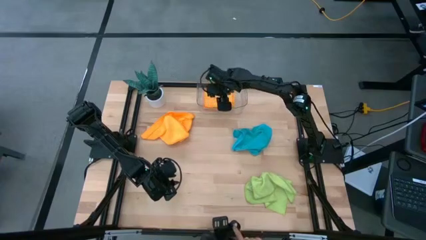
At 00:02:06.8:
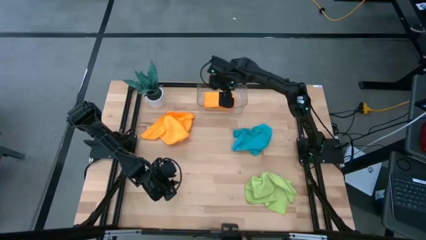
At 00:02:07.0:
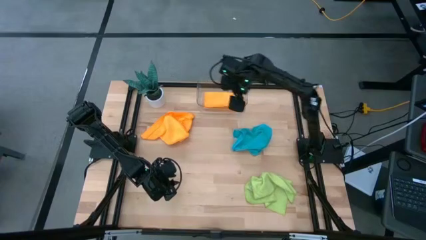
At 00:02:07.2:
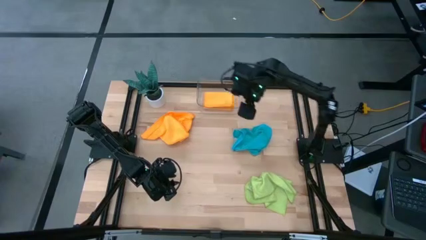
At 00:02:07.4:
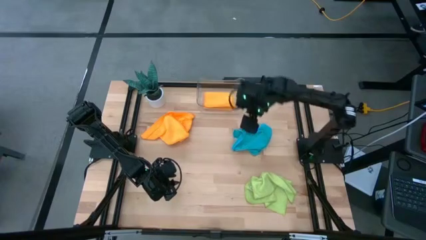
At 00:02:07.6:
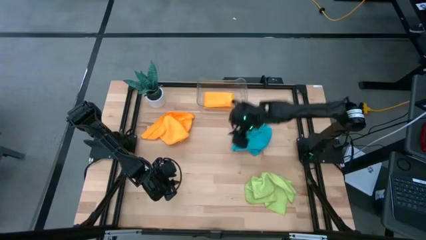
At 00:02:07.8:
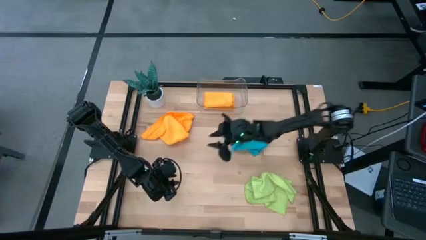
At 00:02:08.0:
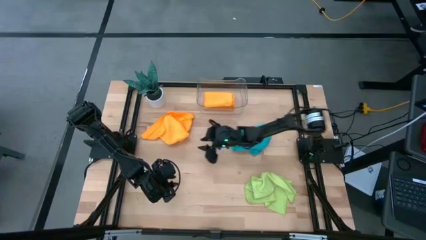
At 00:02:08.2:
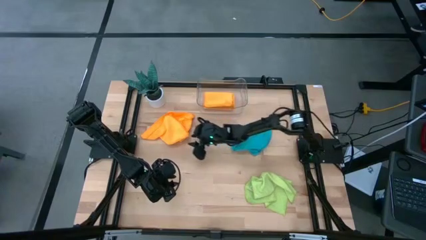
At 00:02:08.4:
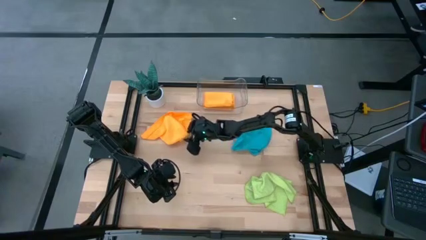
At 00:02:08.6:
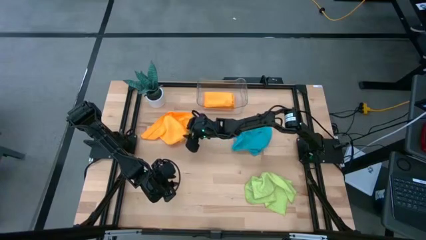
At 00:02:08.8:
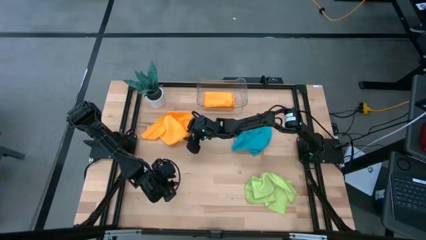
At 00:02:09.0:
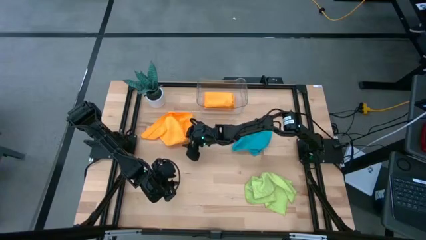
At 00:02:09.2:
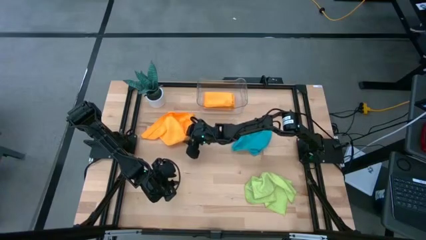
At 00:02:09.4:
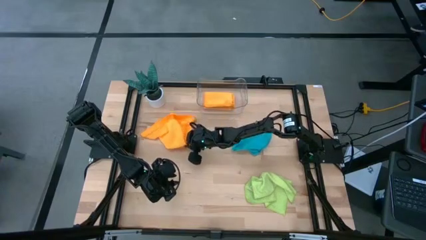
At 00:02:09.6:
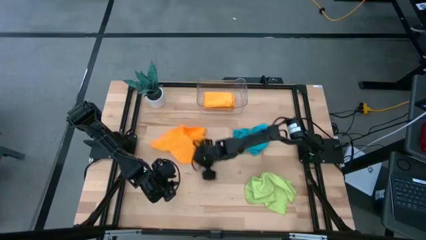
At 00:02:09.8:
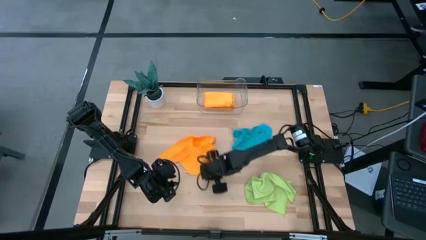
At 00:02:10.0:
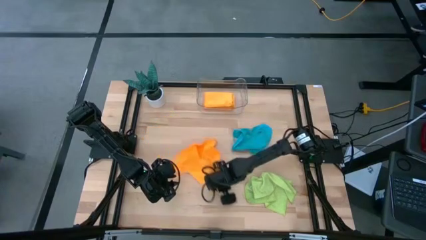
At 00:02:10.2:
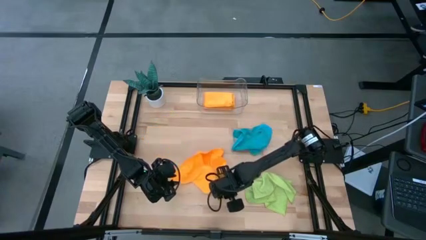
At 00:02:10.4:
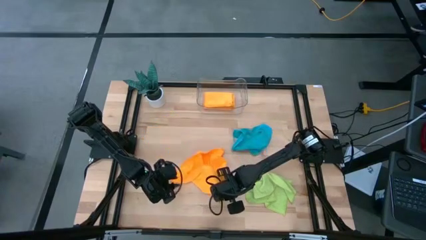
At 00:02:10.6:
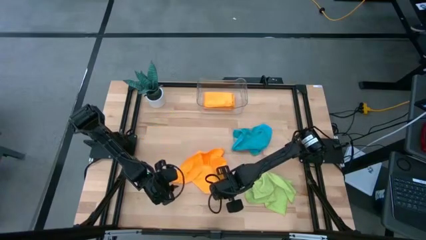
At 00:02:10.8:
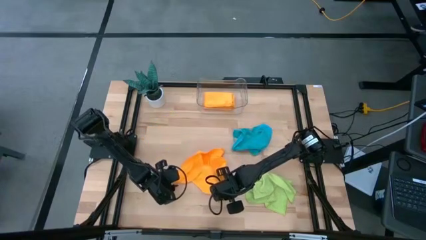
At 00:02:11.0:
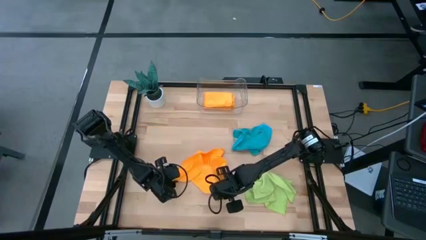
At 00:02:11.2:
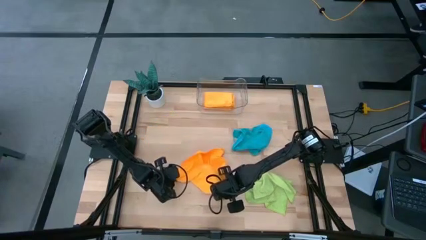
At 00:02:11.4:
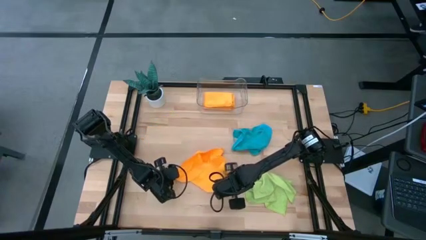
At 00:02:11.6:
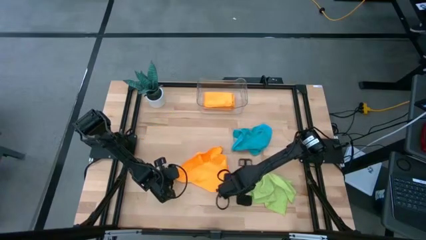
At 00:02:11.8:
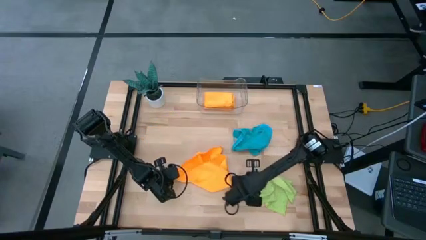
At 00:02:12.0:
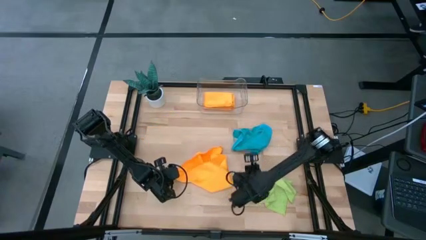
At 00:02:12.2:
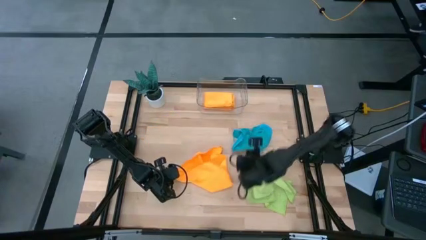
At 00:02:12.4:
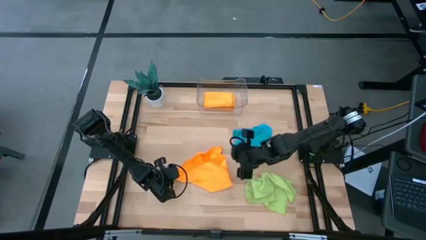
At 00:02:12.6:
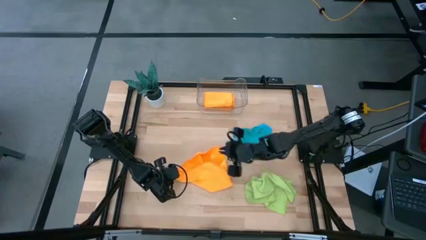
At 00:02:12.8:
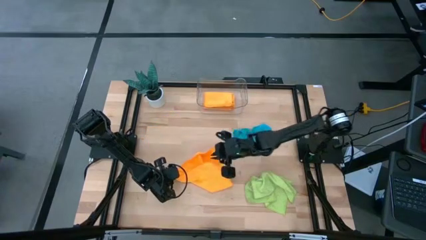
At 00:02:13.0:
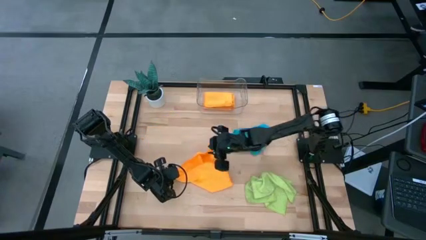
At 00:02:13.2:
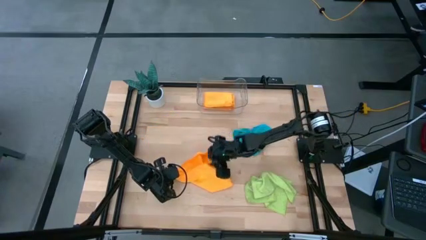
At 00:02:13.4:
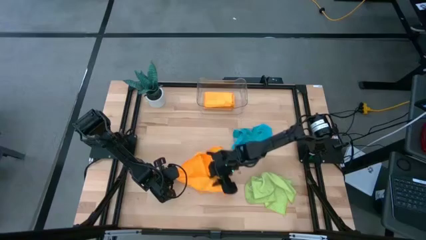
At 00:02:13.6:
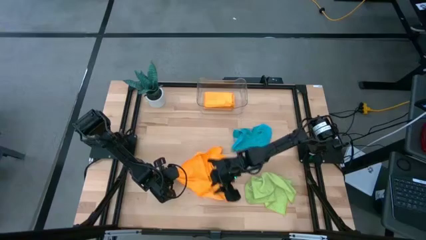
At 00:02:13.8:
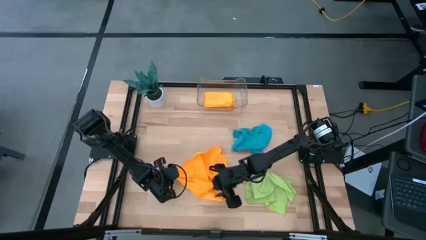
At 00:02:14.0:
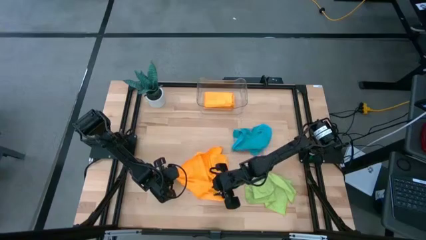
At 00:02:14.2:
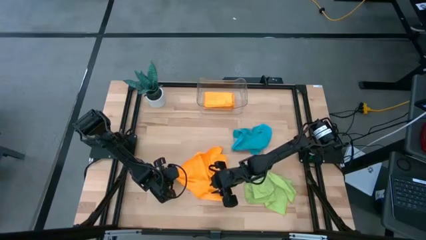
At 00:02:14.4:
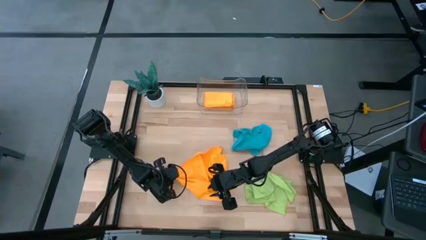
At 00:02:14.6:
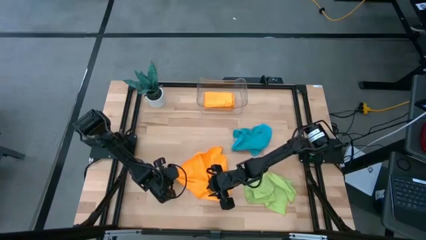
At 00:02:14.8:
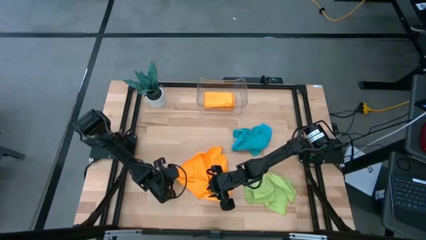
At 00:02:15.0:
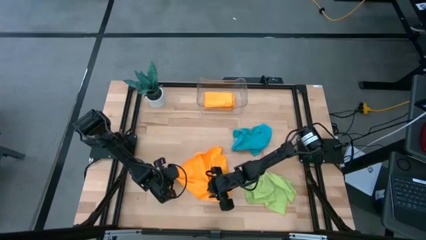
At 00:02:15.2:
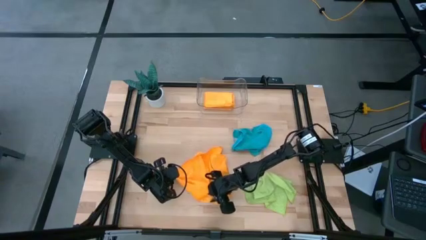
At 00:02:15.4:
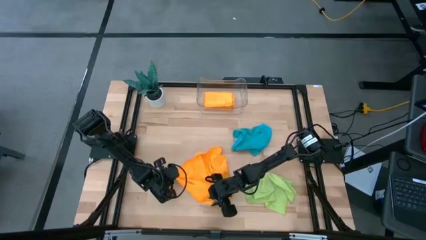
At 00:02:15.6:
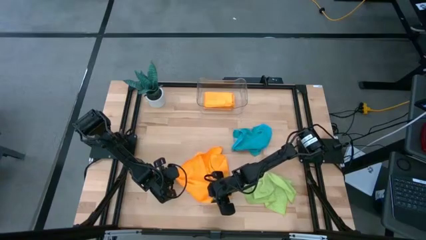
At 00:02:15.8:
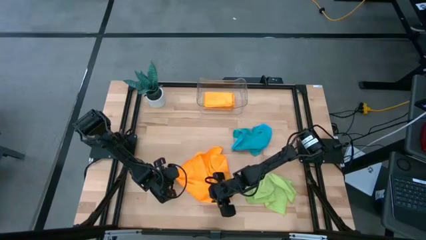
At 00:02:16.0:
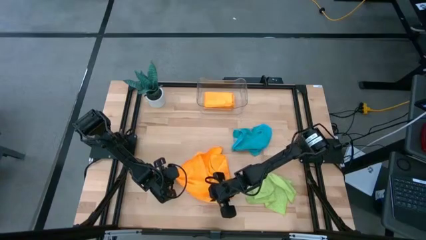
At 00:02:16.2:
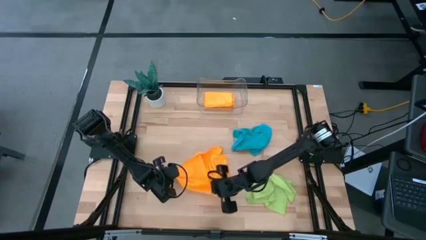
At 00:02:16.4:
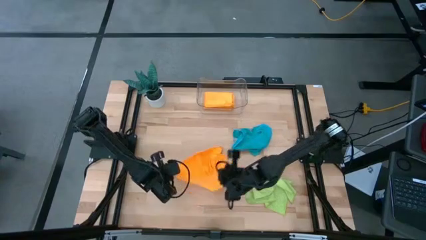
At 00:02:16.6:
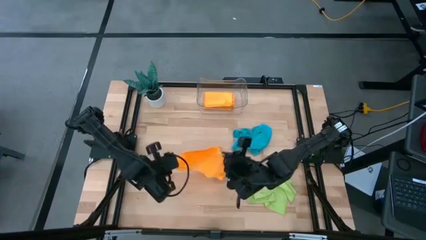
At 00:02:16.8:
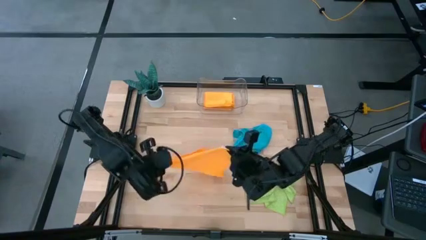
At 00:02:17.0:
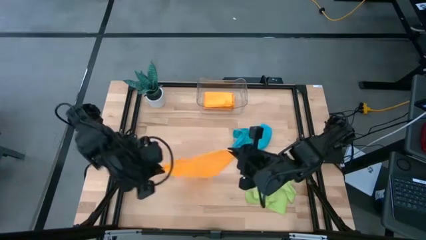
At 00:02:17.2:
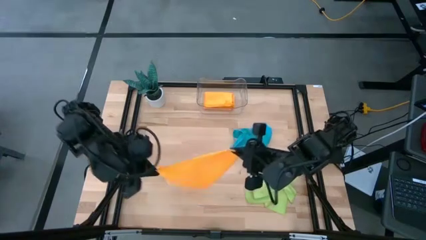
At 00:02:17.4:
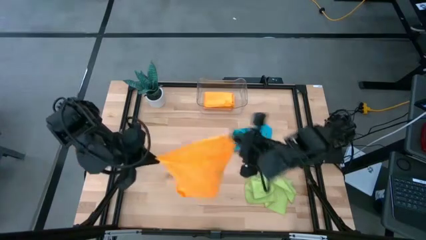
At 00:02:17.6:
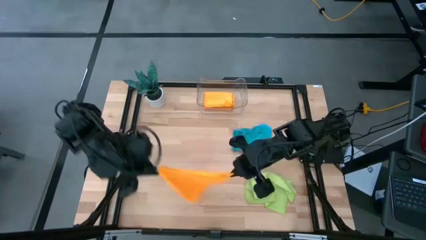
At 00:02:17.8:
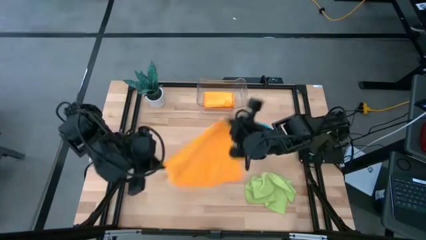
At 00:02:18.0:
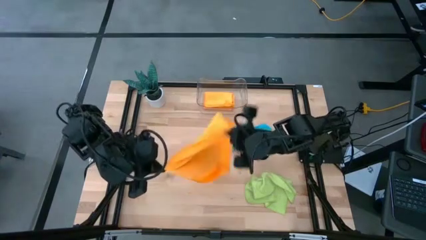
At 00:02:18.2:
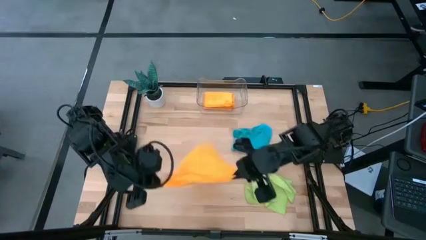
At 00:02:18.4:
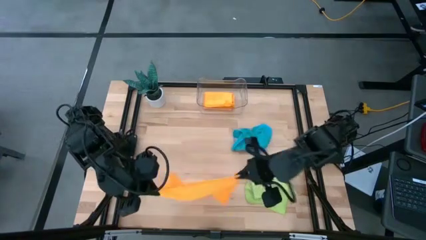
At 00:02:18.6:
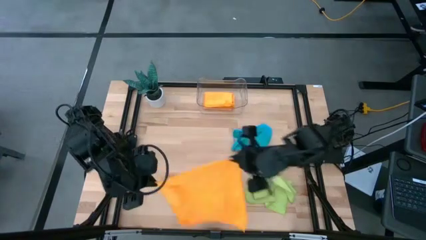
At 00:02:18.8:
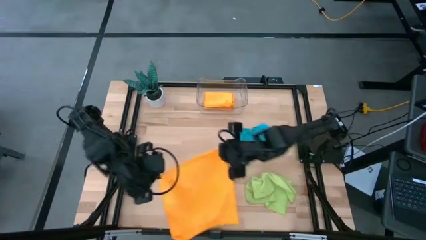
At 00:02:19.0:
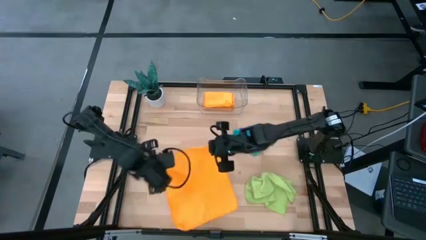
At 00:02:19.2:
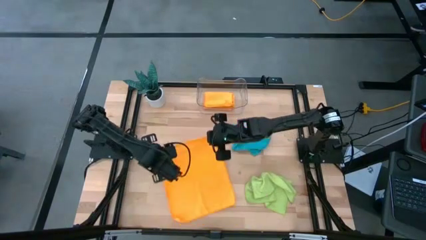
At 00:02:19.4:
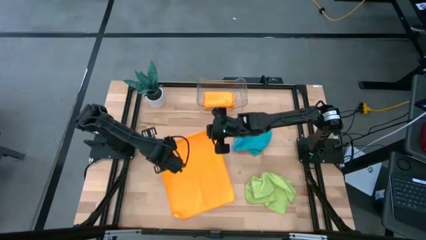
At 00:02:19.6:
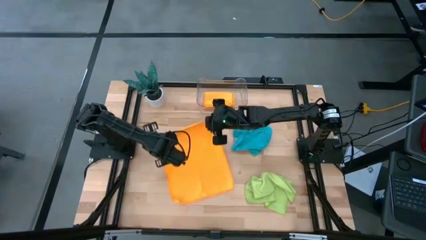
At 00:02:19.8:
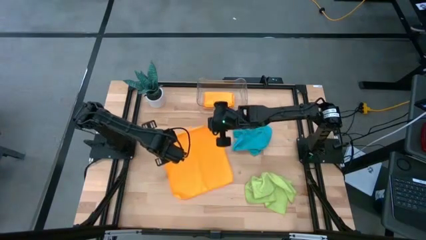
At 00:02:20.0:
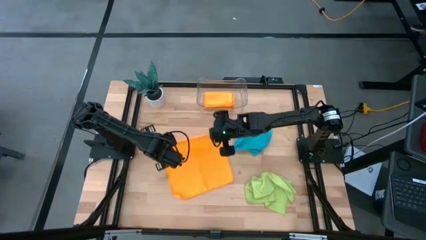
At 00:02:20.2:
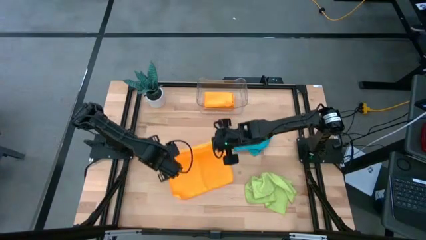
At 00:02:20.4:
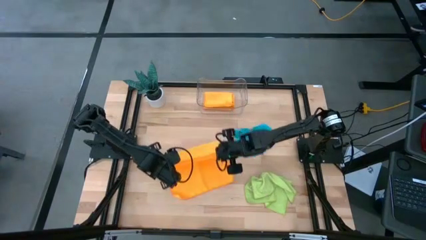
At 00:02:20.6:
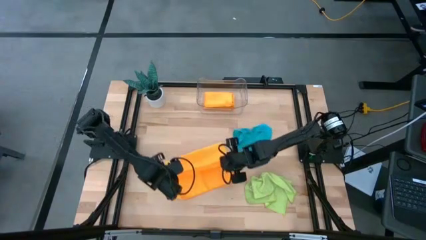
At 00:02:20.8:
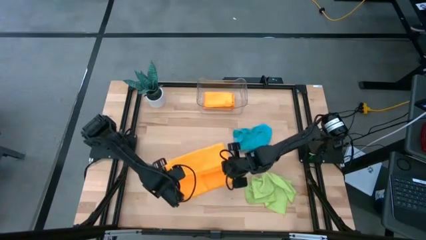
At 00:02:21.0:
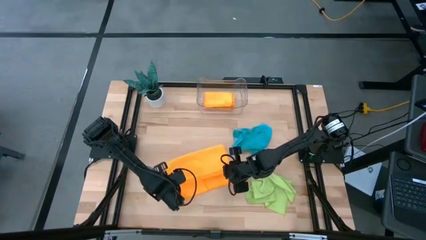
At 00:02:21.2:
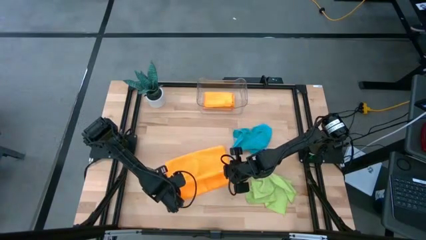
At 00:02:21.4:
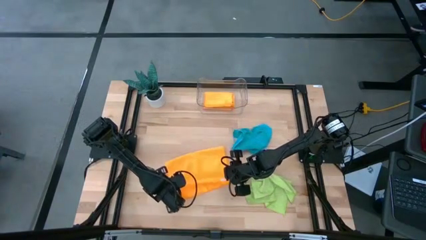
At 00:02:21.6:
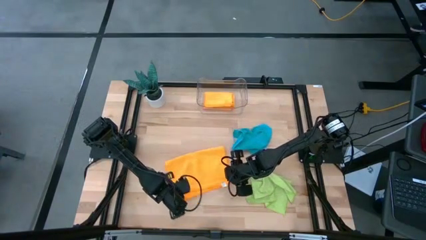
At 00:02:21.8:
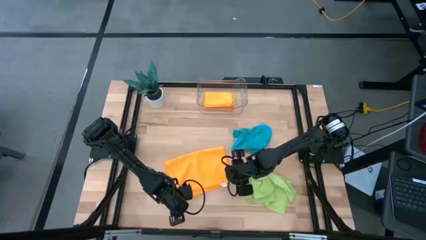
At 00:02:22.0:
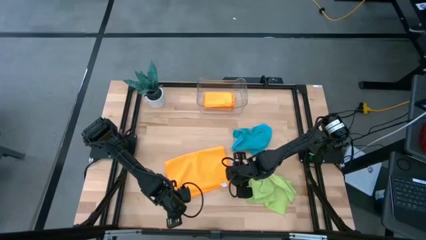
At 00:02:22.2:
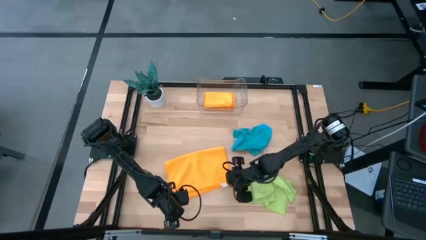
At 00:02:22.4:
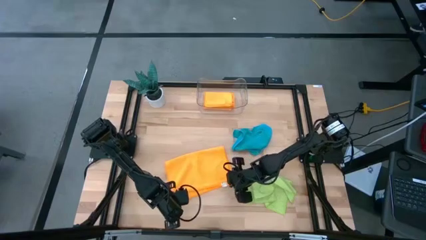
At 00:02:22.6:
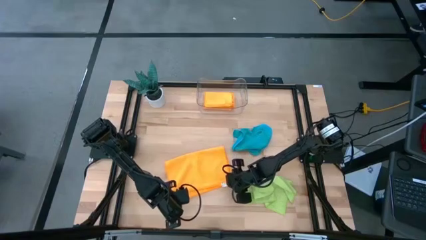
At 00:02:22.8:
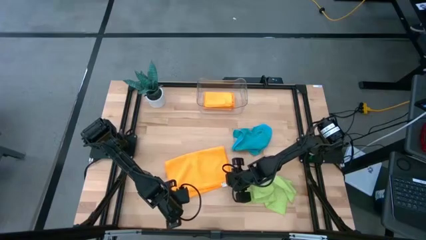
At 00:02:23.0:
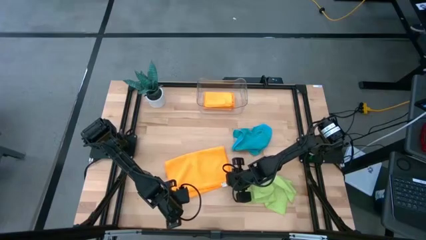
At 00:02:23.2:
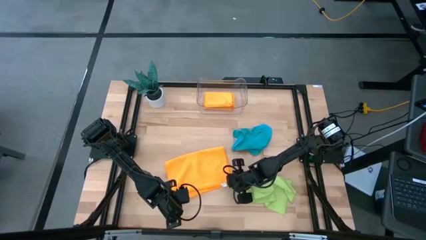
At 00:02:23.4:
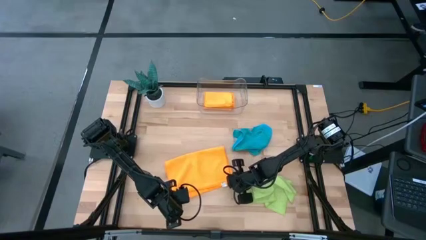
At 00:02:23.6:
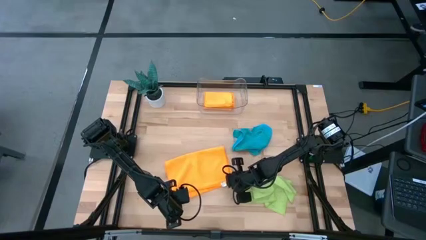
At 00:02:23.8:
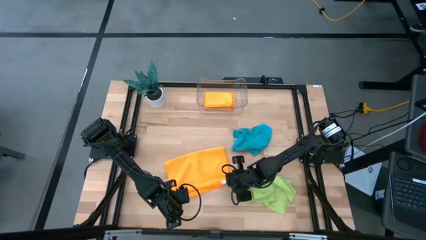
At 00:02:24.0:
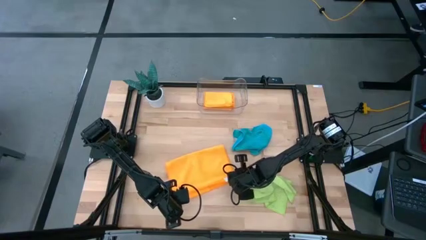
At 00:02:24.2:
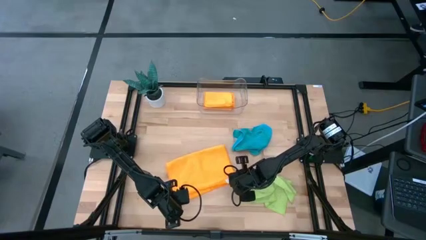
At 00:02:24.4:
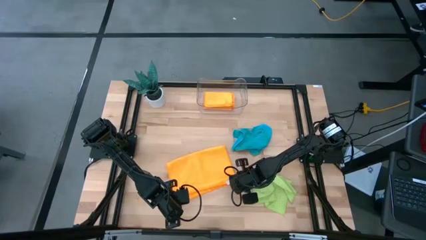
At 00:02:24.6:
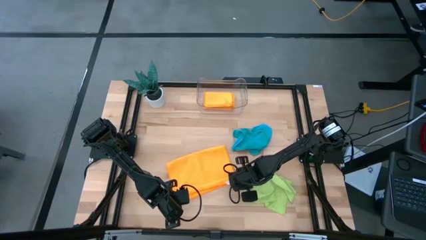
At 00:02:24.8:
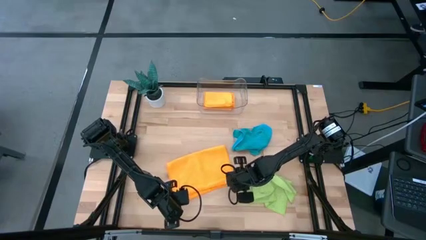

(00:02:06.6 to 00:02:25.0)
Task: Fold microfiber towels
Fold the orange microfiber towel
